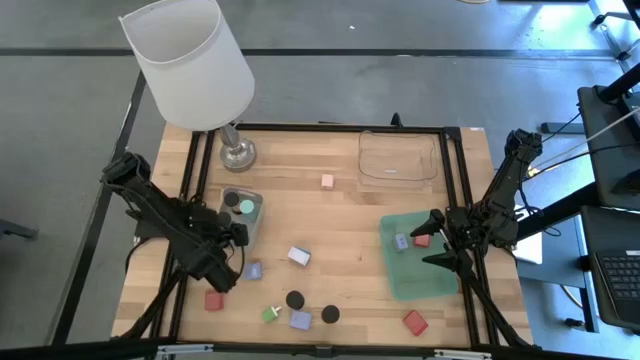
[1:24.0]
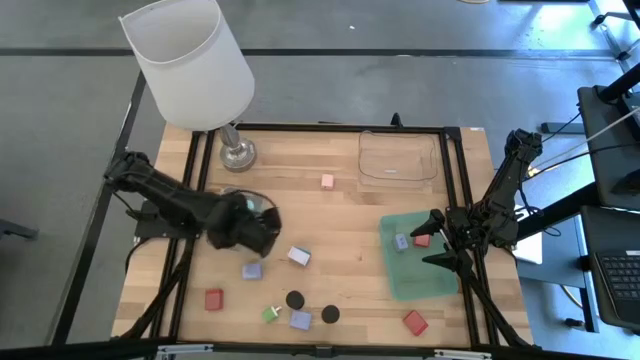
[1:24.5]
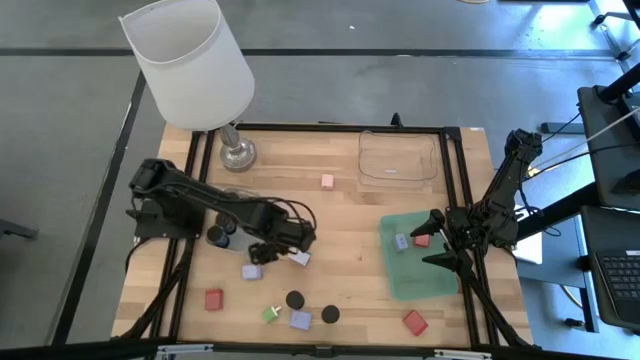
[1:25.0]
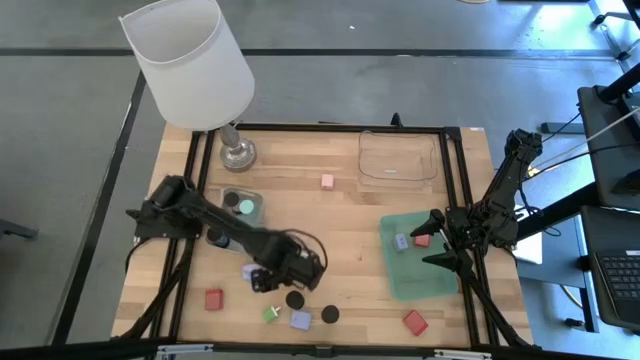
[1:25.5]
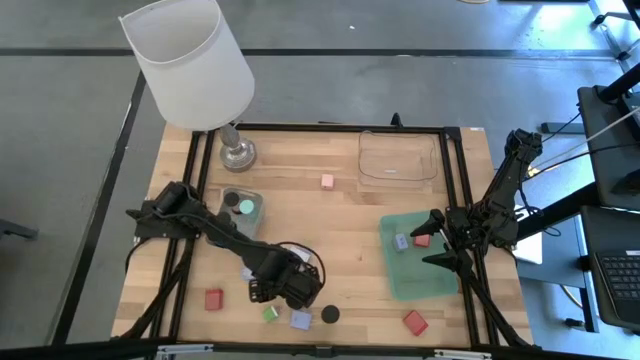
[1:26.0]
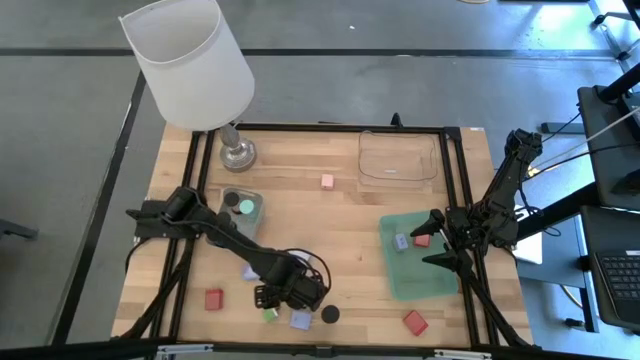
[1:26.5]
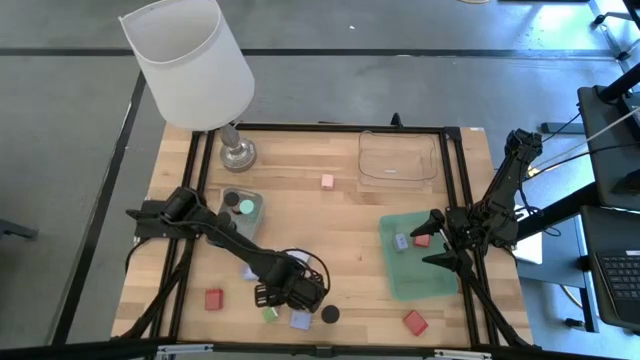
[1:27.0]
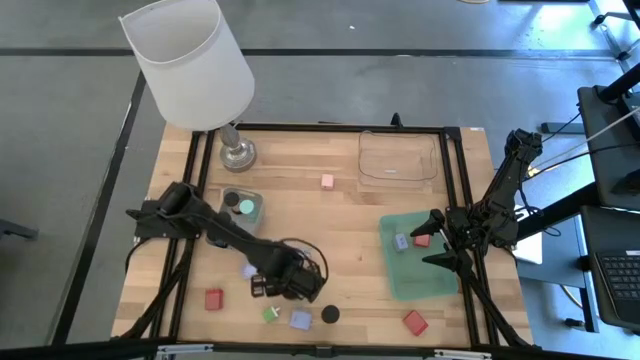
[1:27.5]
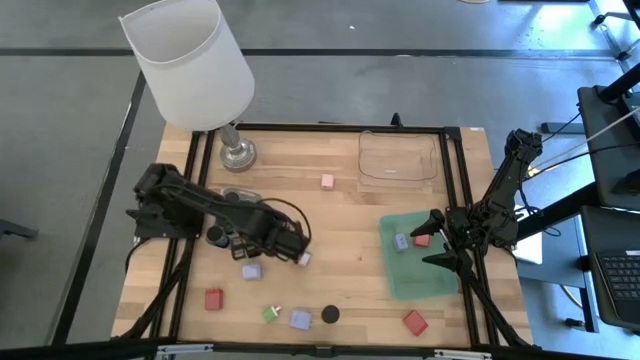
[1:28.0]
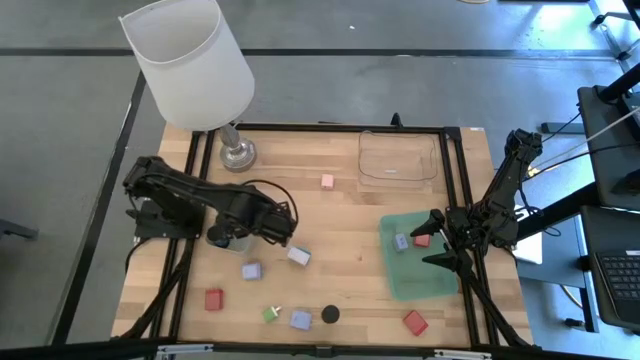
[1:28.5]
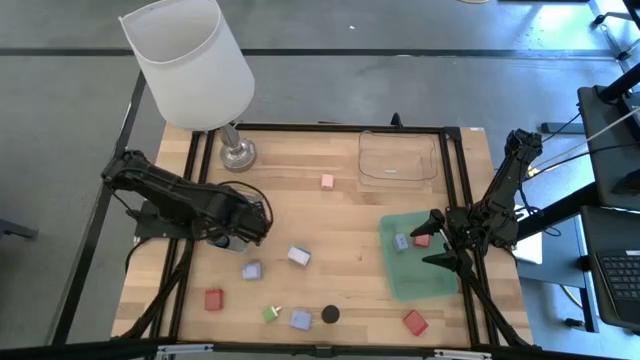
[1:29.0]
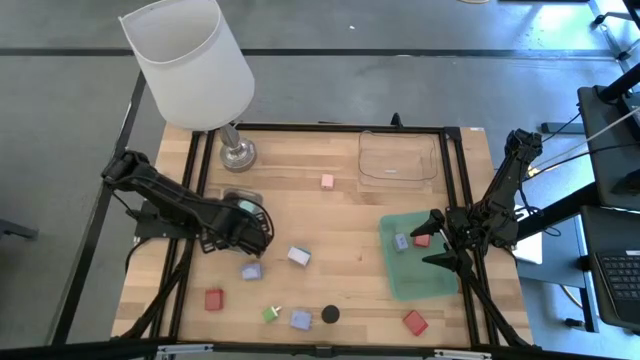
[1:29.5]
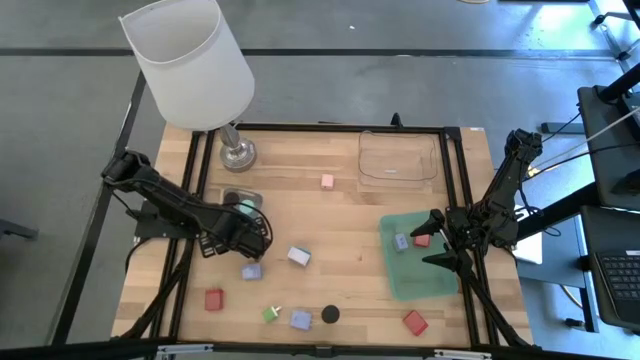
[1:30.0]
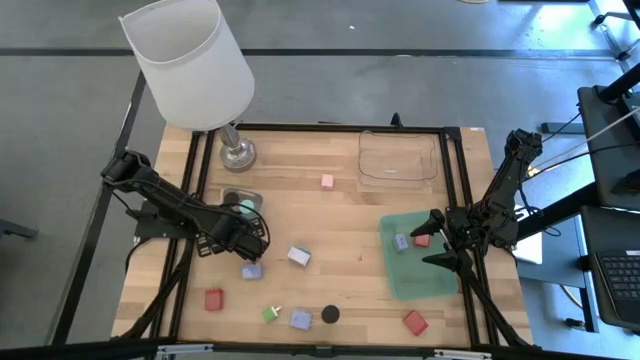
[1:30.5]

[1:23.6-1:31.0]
Task: Pick & Place Office items
Put the red hourglass into the gray bin

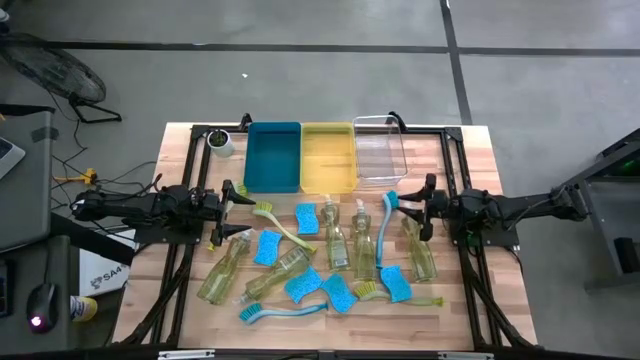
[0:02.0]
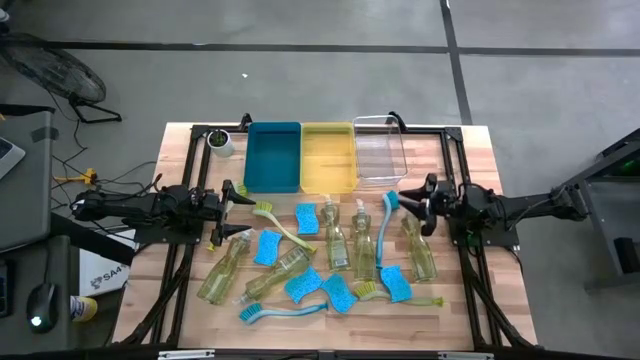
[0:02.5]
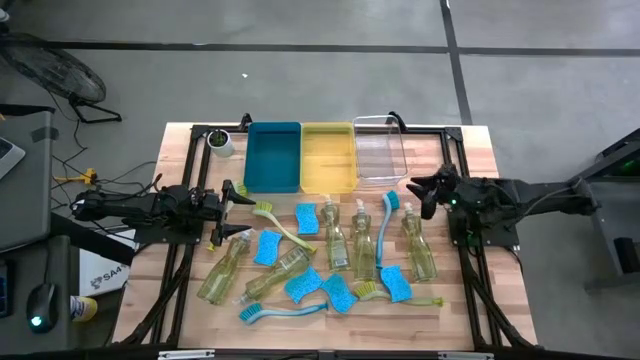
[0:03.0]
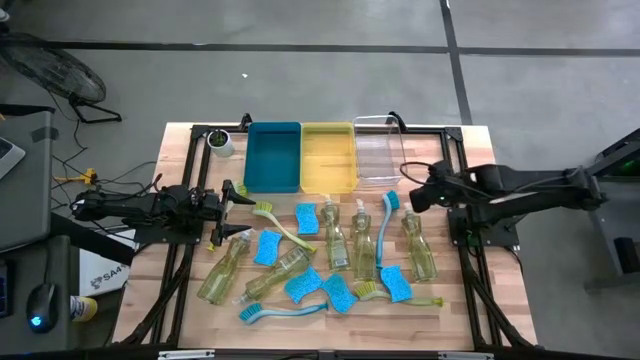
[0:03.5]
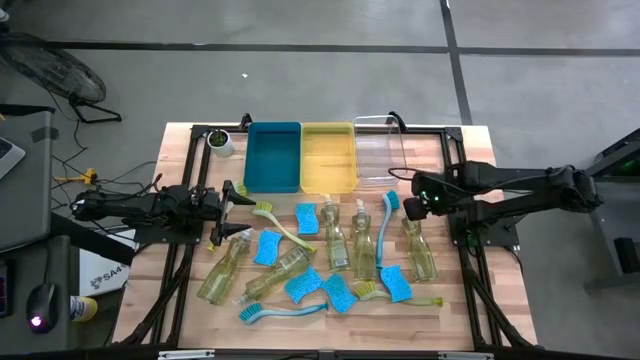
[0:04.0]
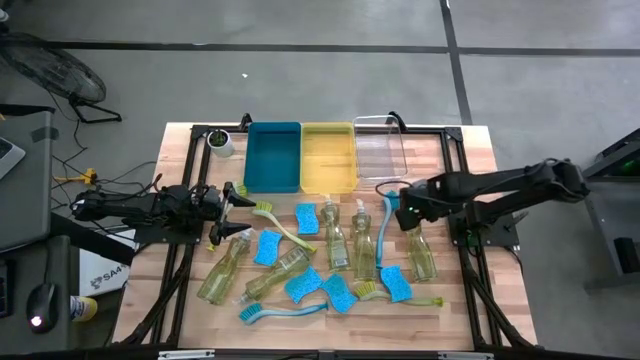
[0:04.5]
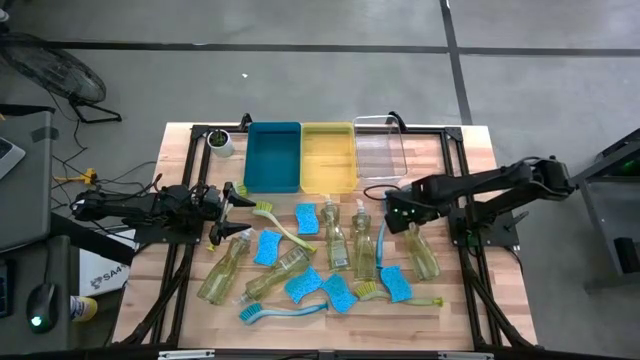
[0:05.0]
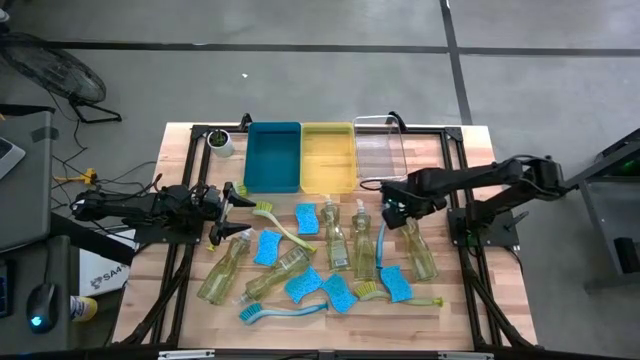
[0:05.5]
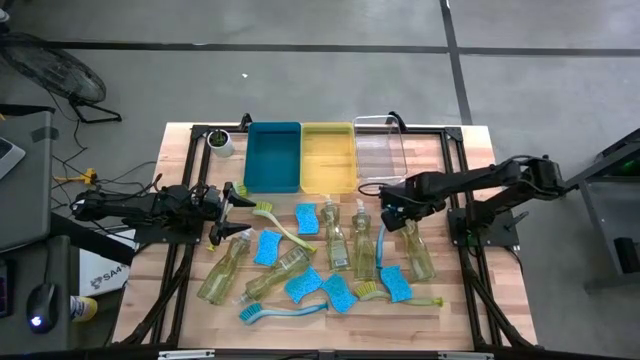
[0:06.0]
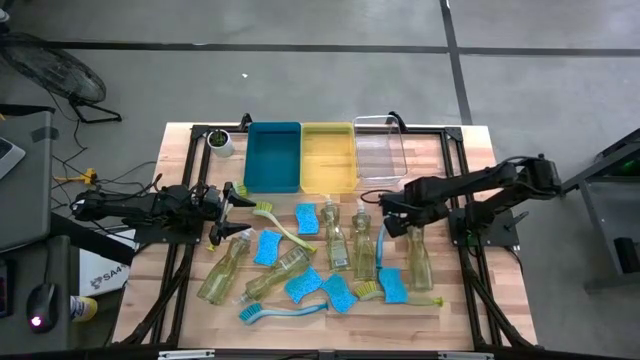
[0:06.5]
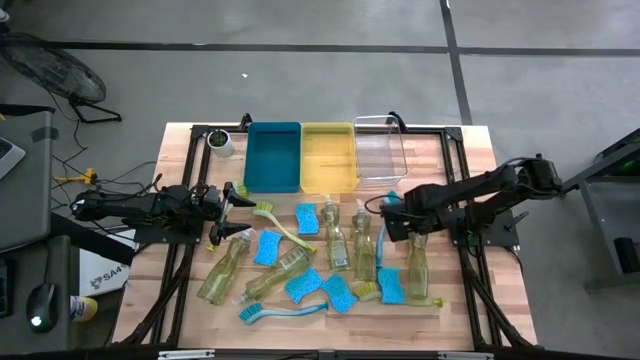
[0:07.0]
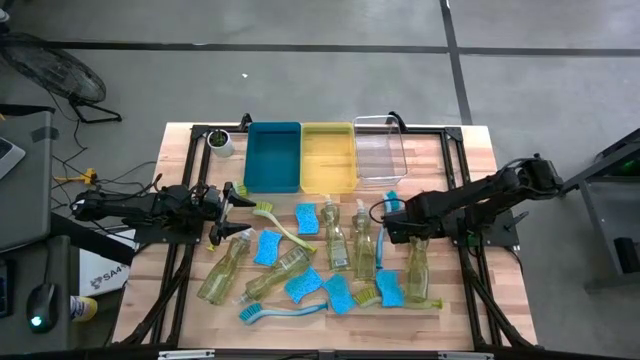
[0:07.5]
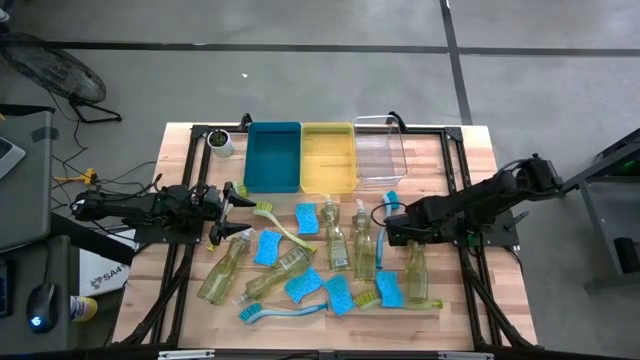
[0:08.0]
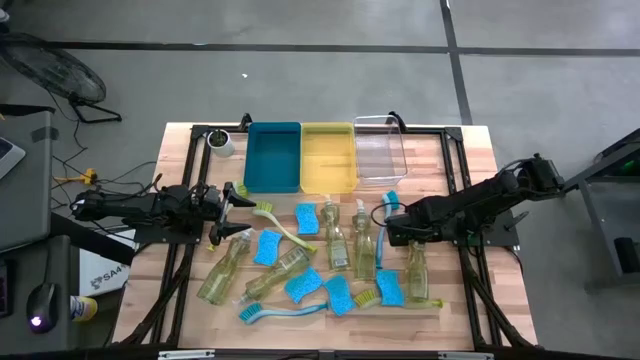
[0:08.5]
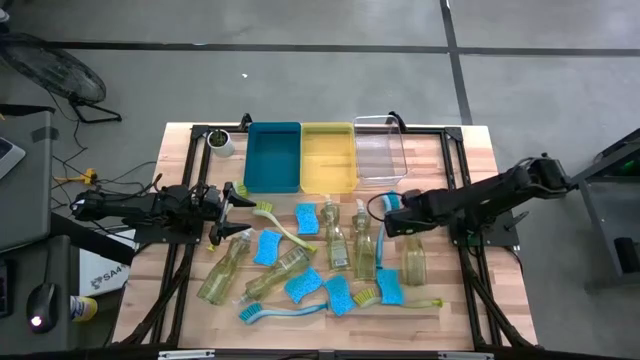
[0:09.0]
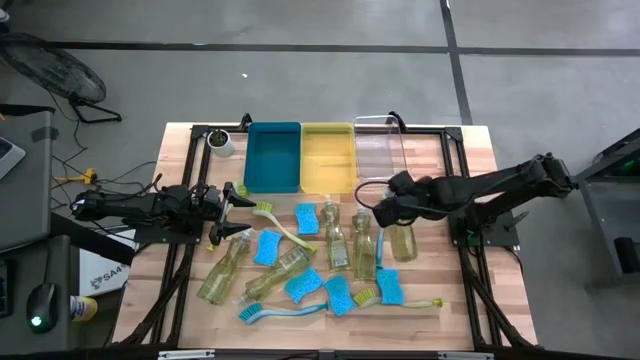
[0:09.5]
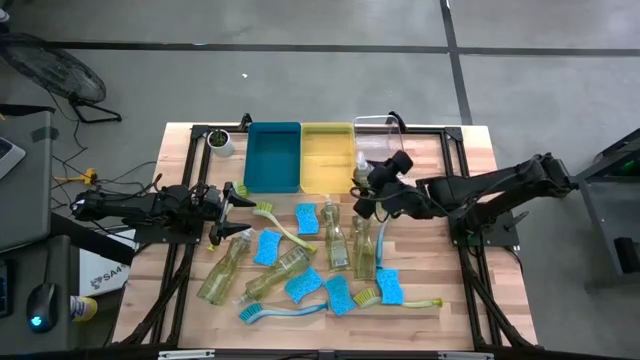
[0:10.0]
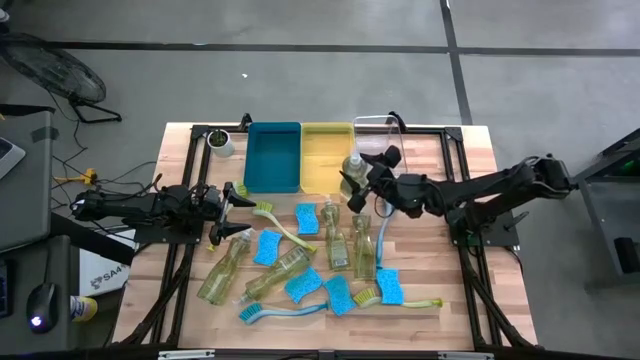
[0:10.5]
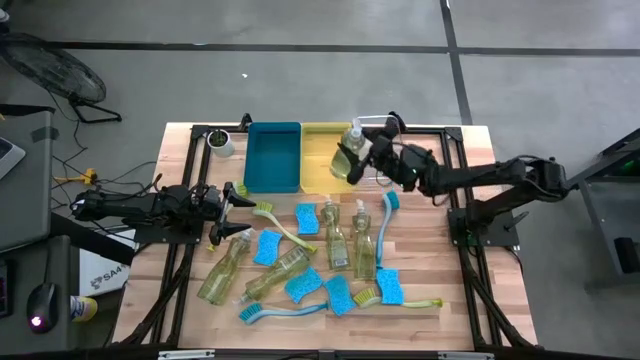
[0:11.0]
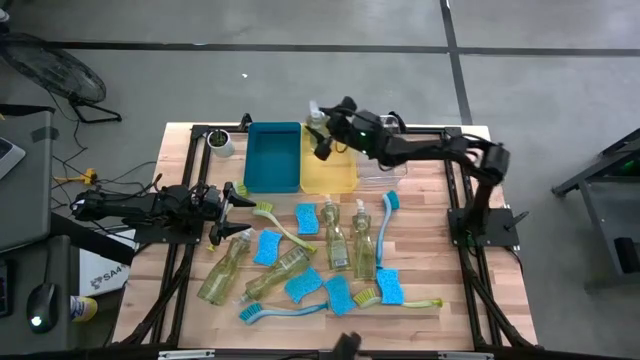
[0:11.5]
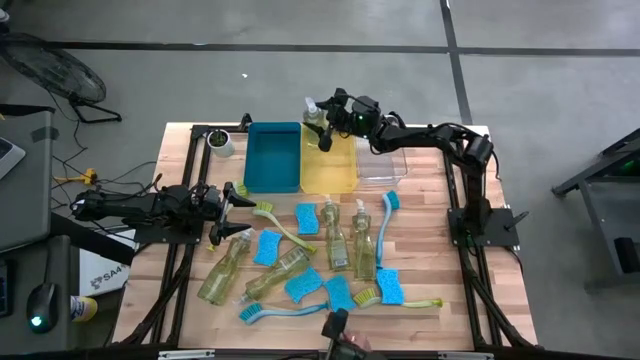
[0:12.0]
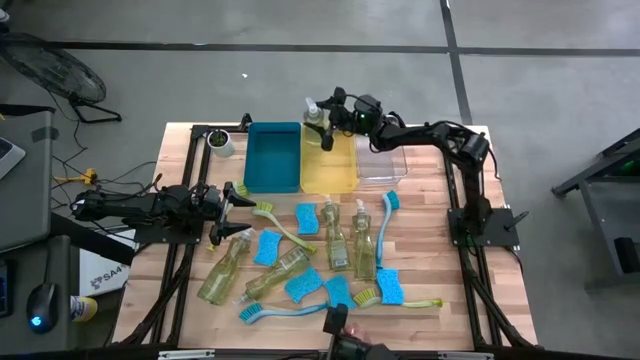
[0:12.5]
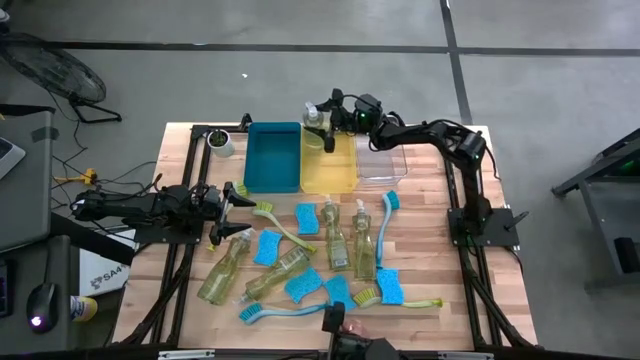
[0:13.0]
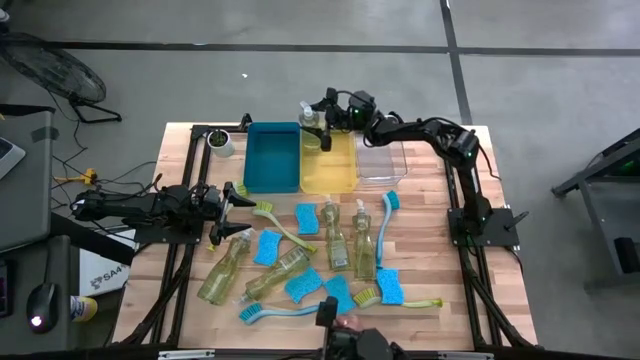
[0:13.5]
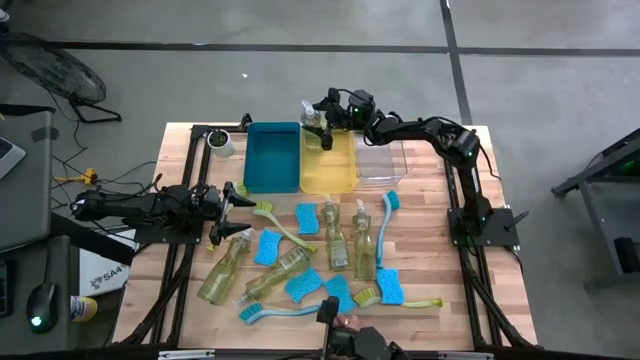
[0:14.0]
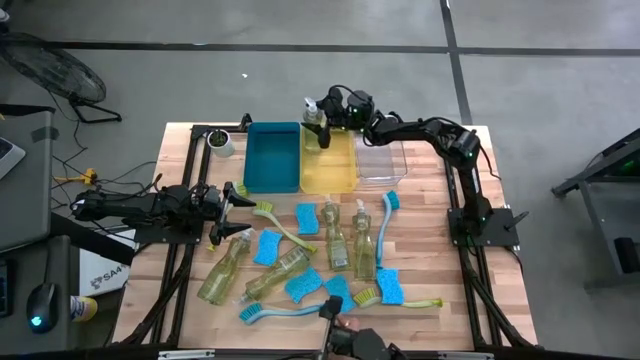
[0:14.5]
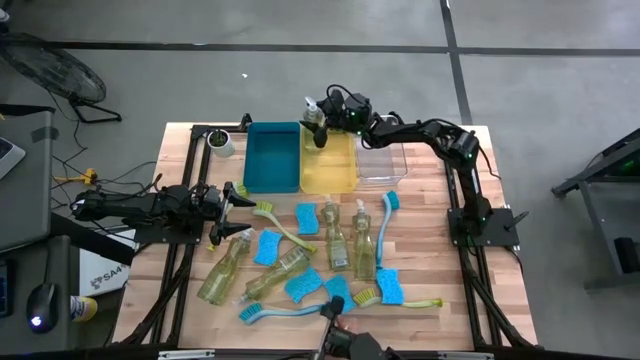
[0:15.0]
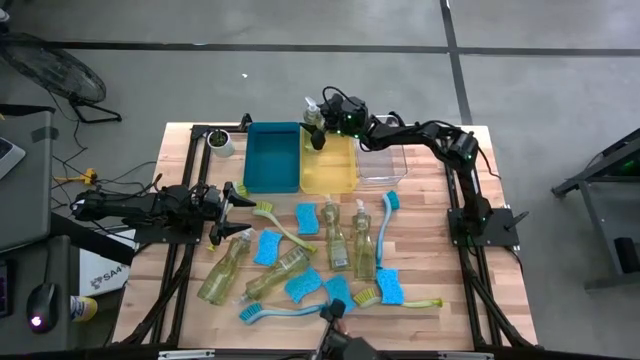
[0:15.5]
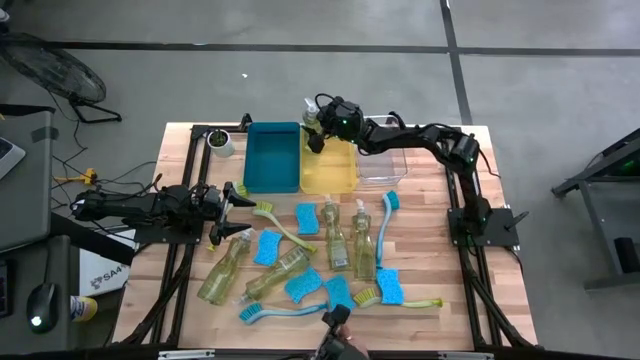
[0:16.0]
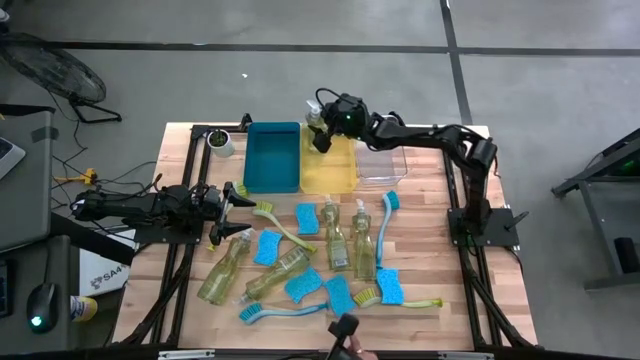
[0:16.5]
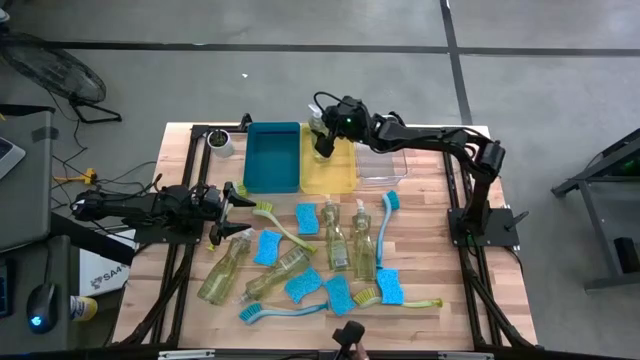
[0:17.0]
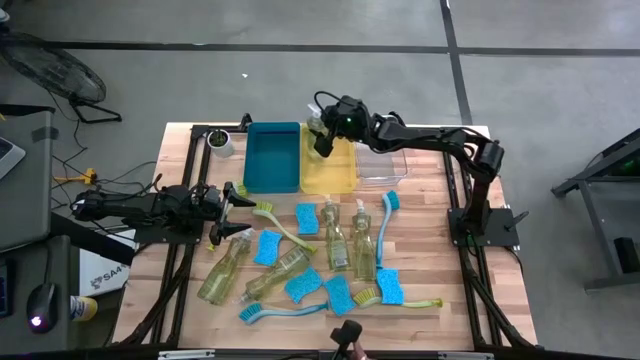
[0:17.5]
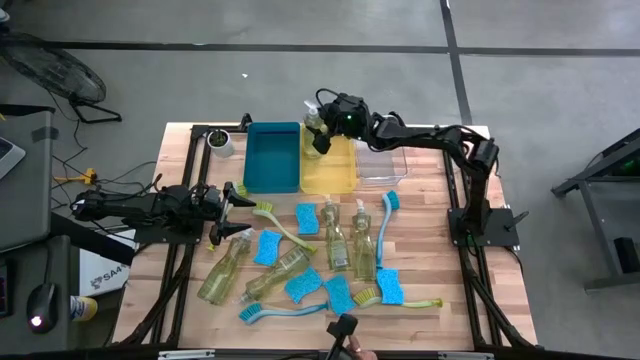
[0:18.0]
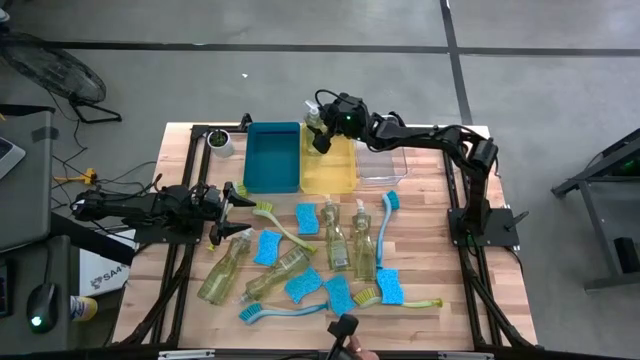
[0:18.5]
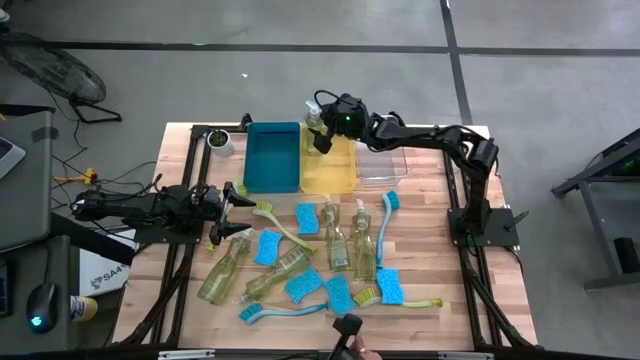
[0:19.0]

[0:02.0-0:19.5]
Task: Pick & Place Kitchen Sink Supplies
Put the dishwashing liquid into the yellow bin
